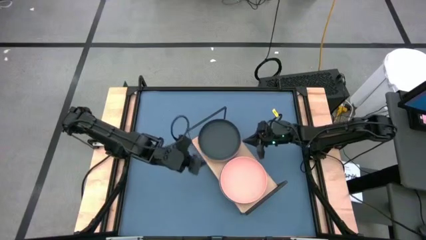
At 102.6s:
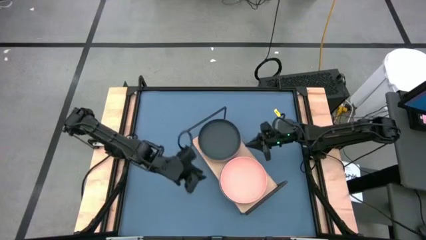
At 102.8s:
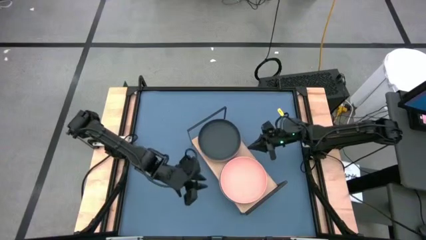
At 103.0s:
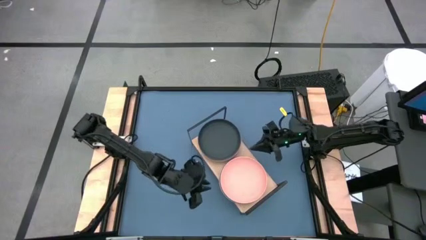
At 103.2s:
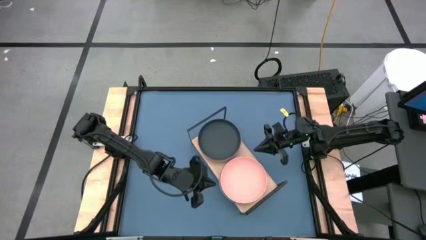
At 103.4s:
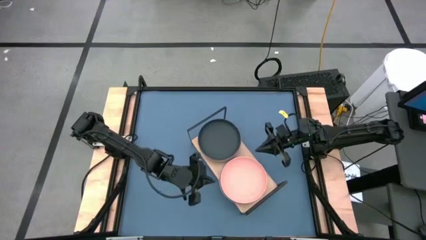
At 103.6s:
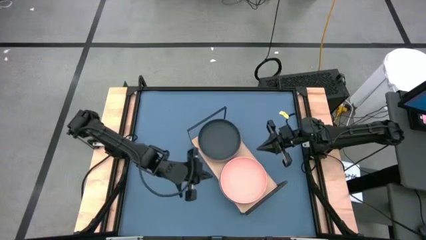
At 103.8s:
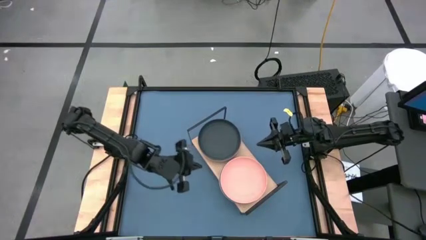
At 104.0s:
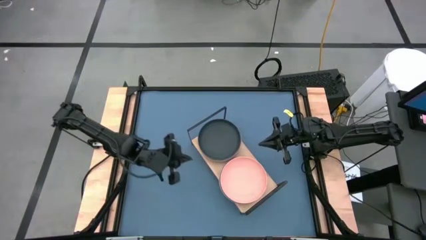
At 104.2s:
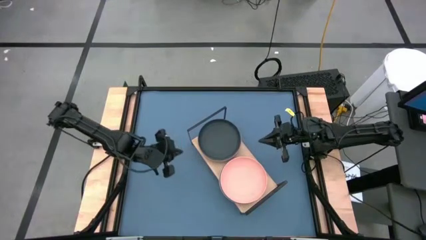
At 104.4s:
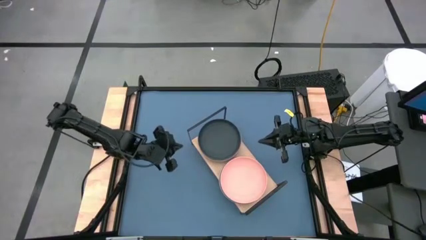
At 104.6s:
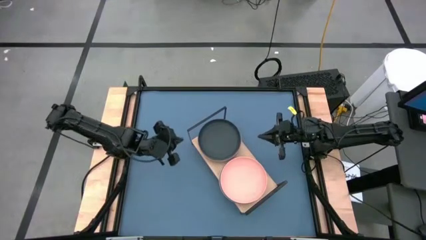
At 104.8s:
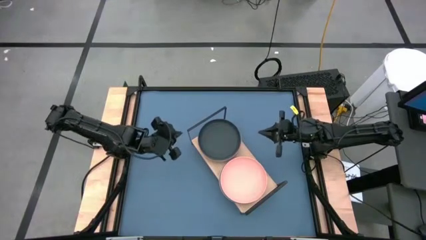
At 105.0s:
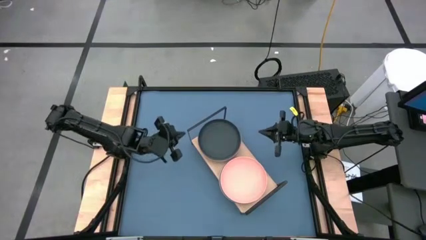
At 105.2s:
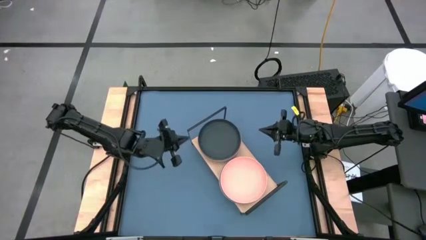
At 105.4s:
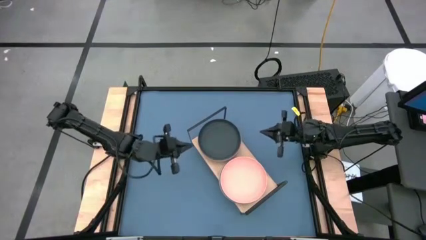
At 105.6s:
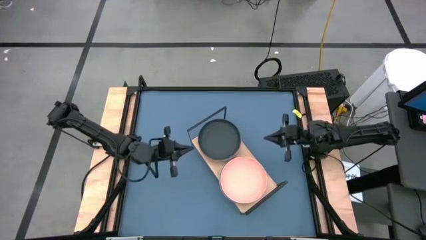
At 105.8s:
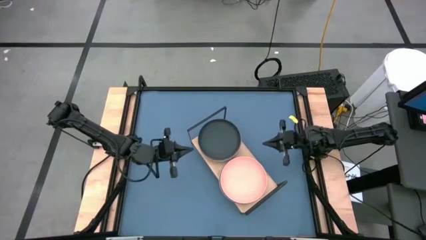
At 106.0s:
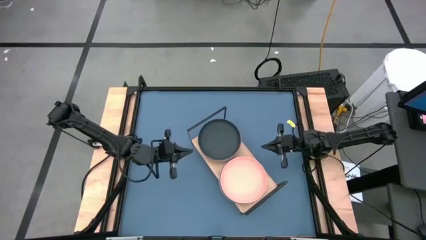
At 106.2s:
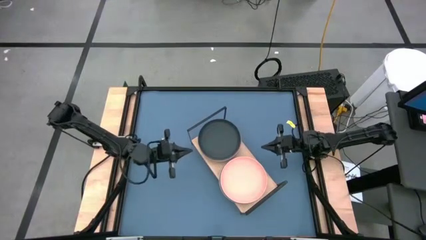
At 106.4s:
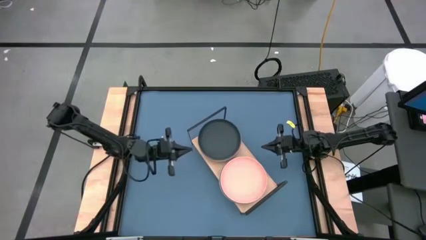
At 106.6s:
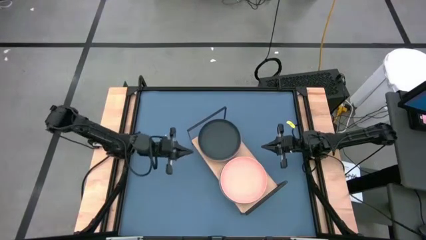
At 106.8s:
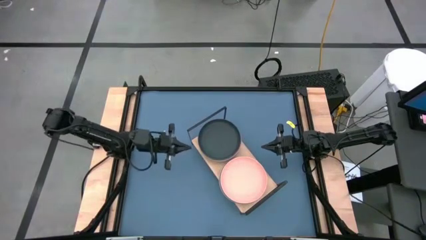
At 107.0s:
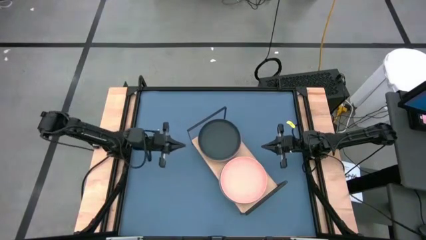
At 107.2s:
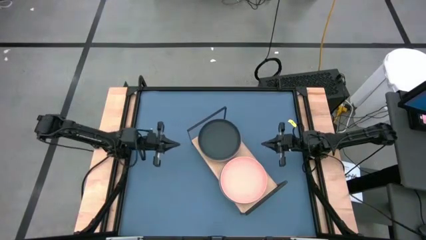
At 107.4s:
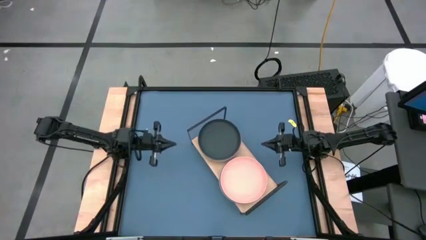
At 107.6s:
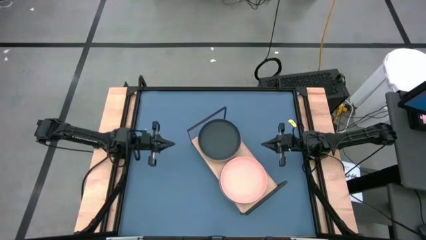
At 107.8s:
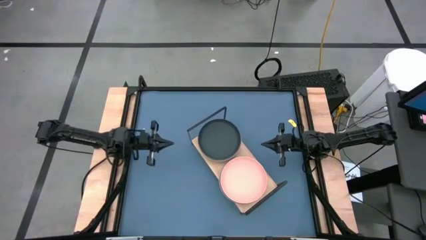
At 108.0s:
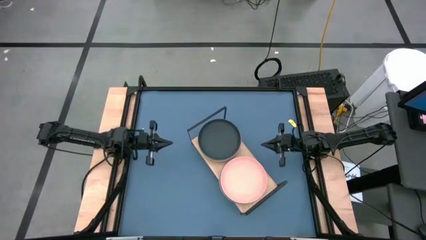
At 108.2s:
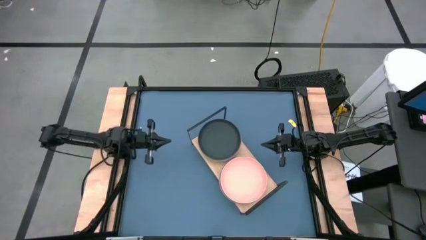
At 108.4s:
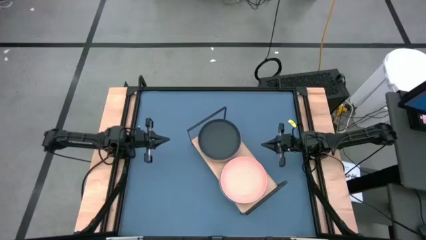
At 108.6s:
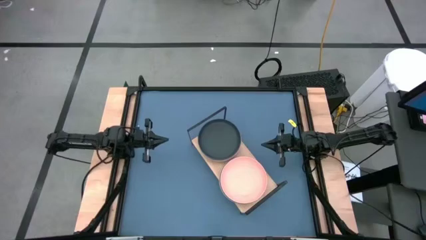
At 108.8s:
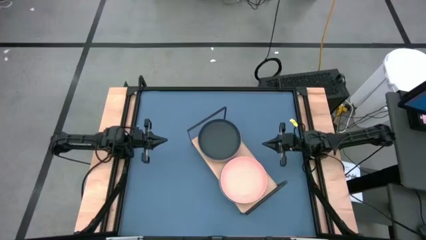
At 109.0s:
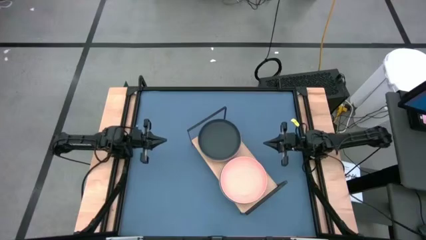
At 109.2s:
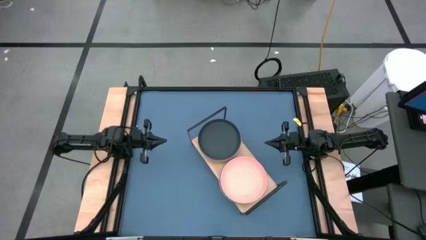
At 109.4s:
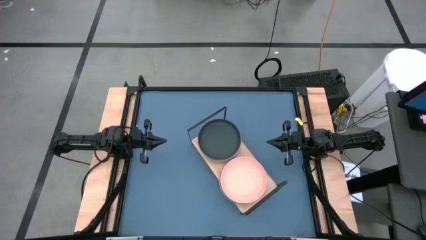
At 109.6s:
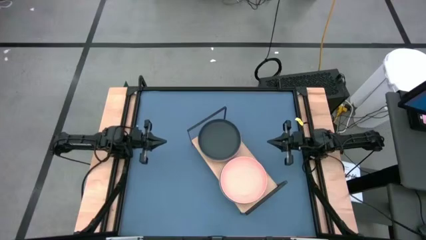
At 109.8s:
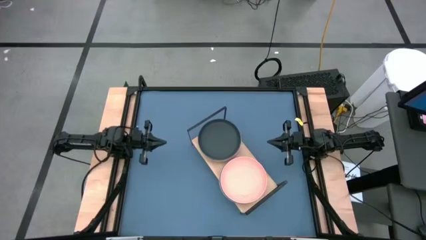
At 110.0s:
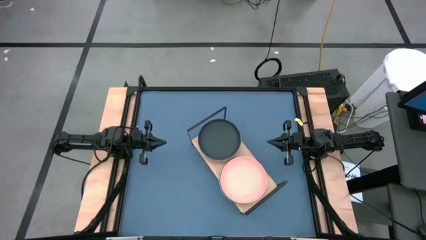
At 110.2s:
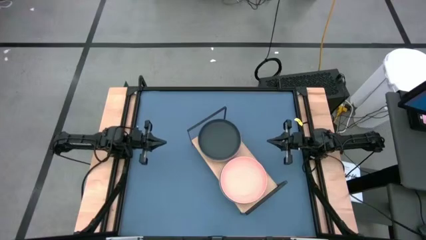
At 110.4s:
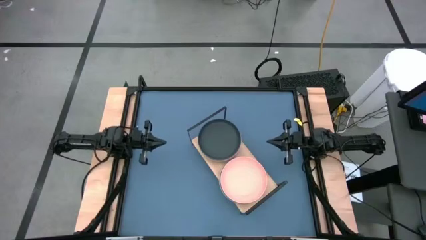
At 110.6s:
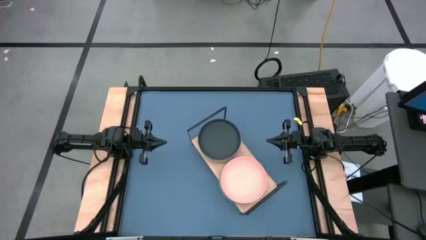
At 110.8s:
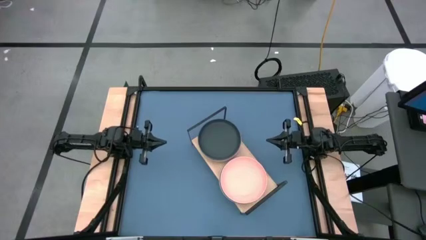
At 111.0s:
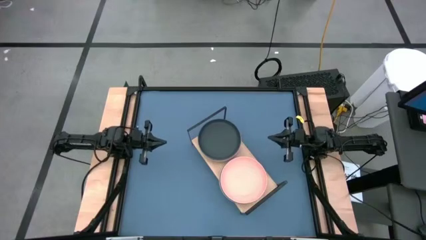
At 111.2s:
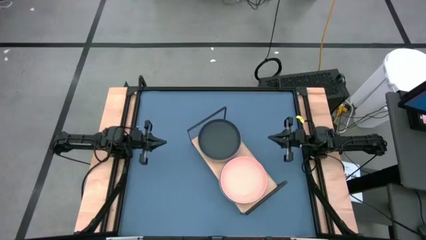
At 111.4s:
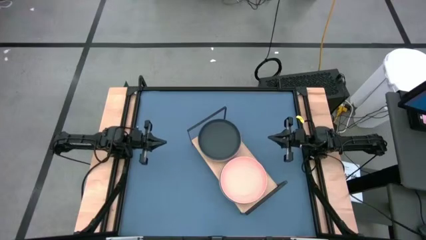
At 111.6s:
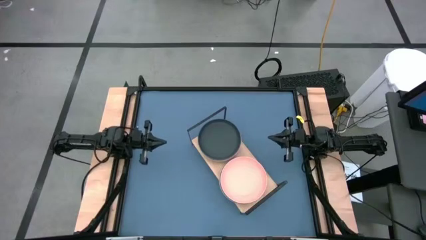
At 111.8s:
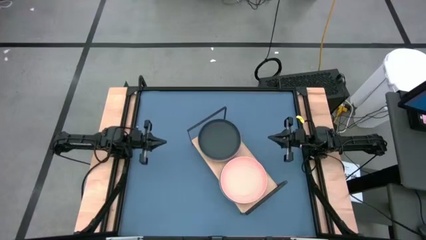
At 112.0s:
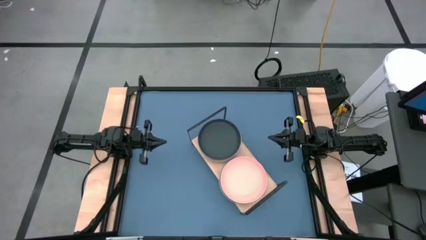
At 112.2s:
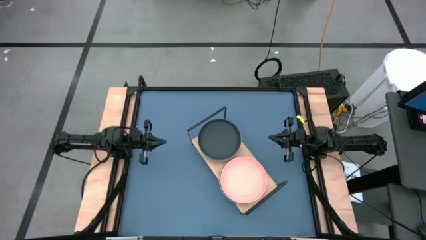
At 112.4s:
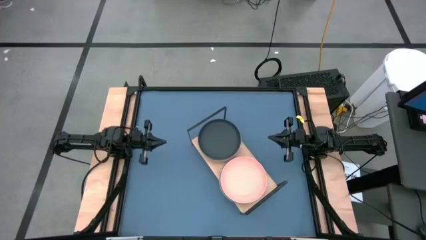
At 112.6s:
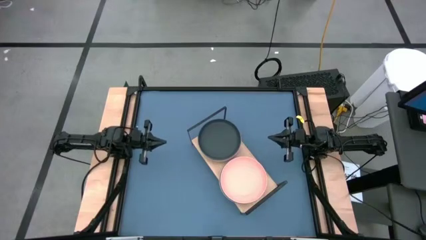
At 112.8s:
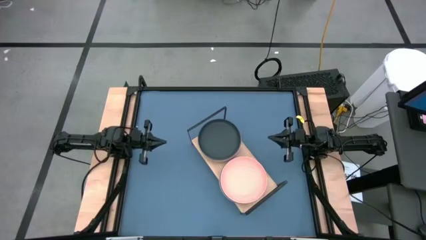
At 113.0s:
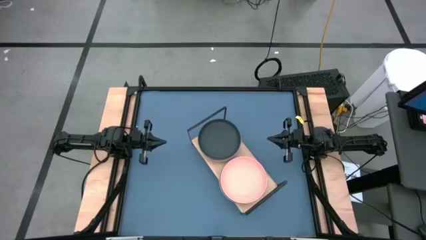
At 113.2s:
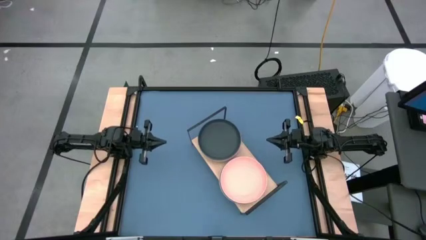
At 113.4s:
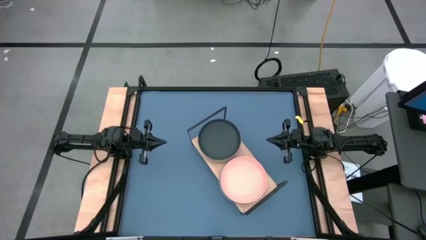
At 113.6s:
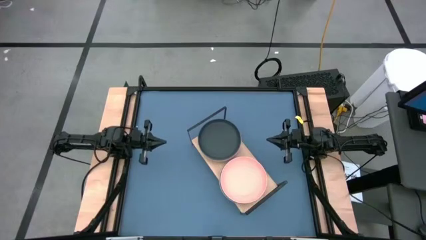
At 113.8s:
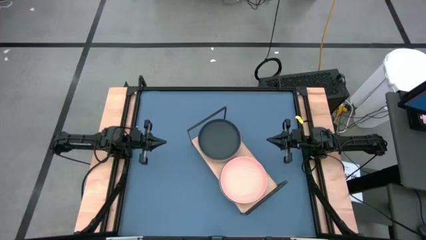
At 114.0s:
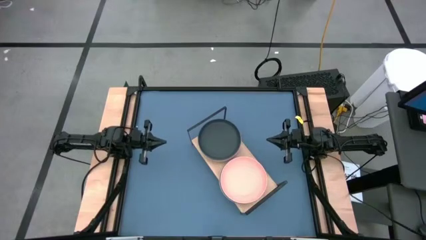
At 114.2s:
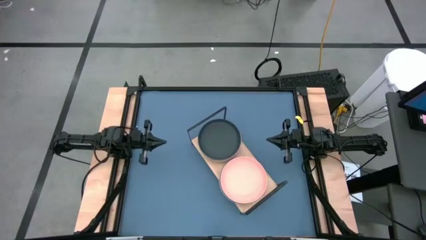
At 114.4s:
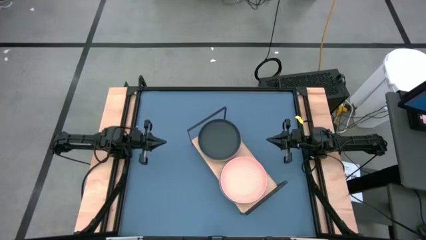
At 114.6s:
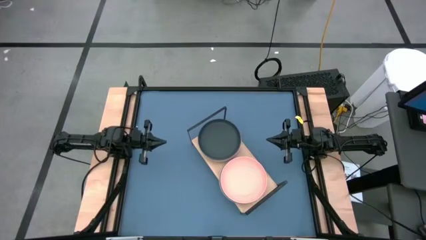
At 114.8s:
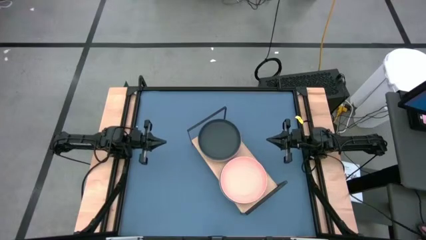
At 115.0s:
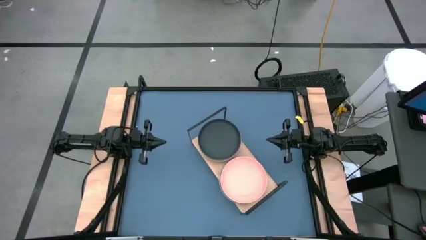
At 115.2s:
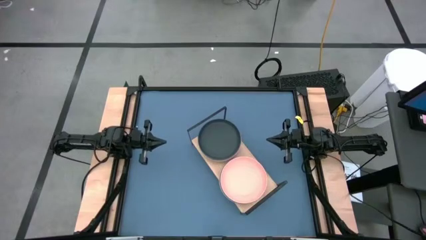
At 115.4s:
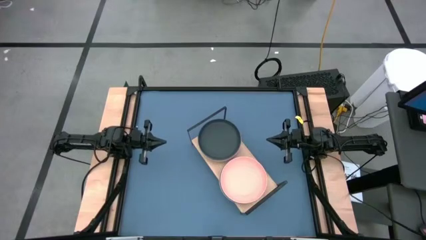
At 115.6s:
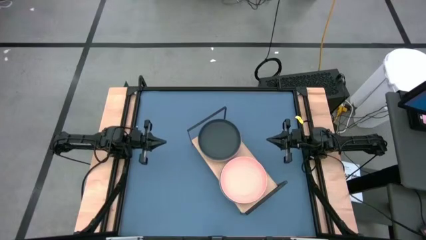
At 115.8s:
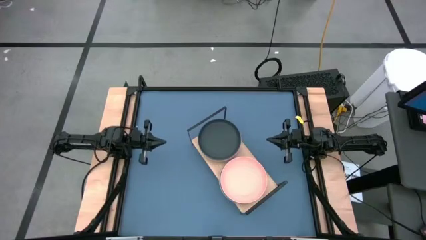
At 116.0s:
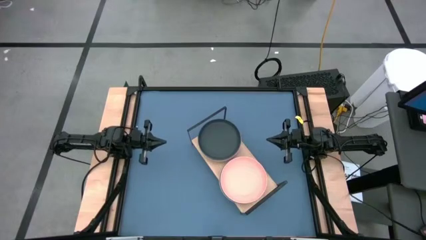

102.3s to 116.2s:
Task: Place and stack plates onto a shelf
Return to Home Position

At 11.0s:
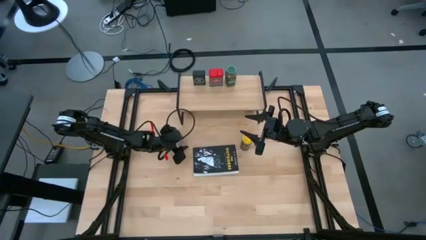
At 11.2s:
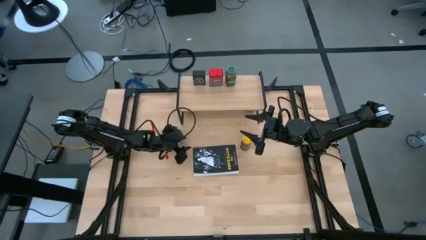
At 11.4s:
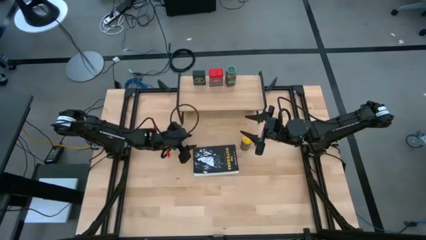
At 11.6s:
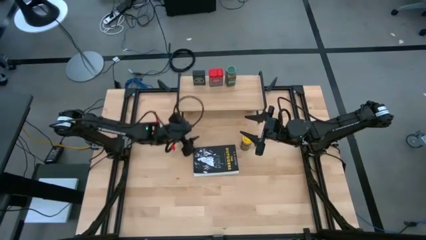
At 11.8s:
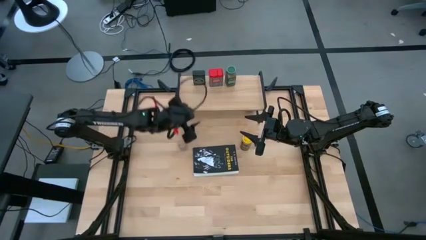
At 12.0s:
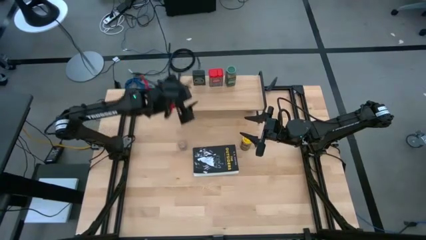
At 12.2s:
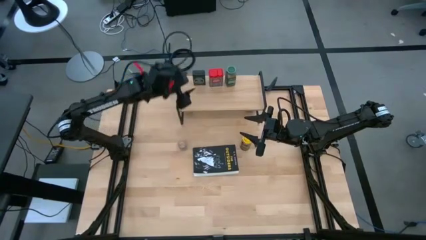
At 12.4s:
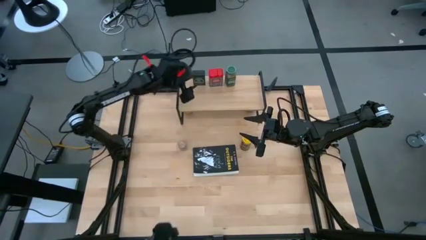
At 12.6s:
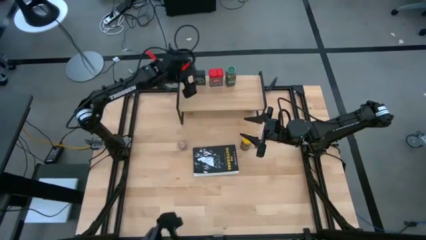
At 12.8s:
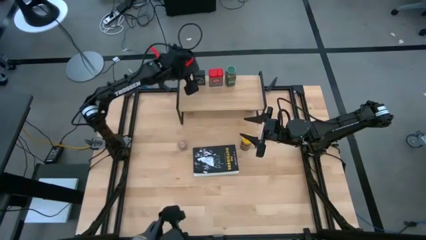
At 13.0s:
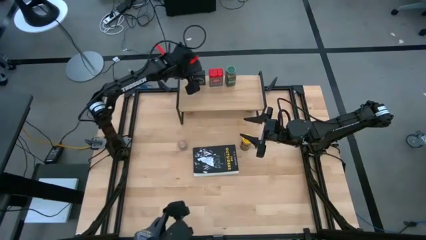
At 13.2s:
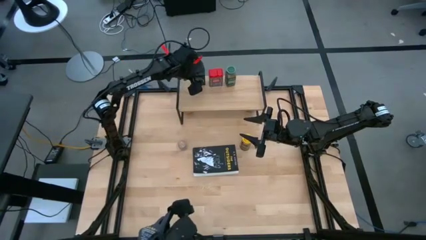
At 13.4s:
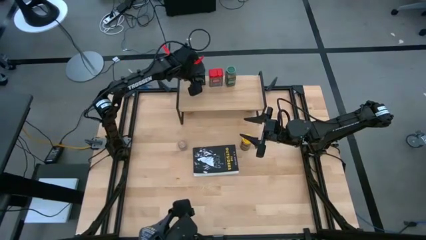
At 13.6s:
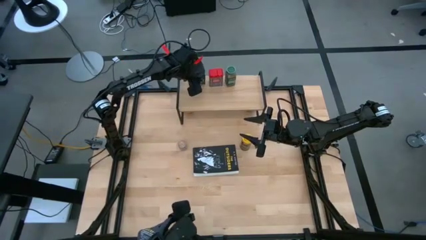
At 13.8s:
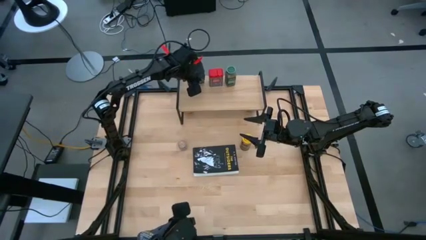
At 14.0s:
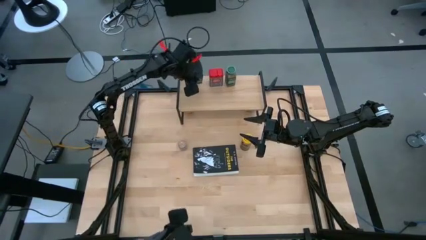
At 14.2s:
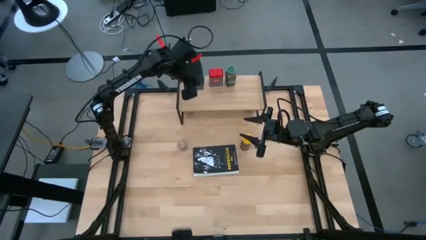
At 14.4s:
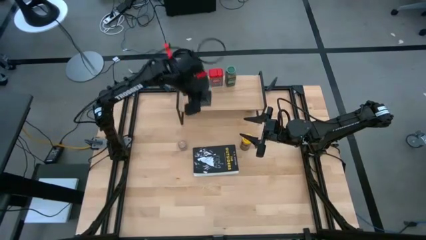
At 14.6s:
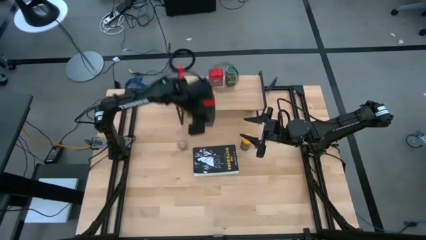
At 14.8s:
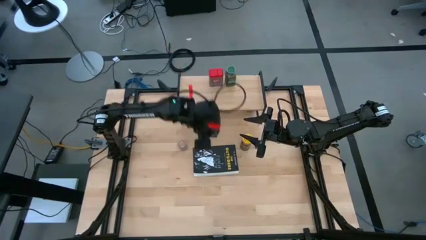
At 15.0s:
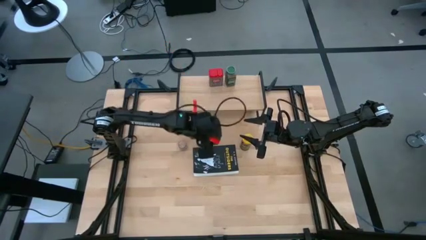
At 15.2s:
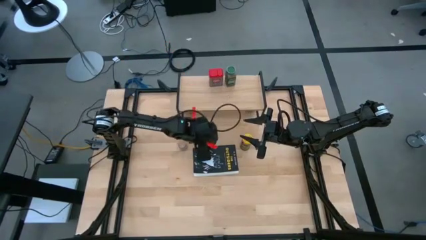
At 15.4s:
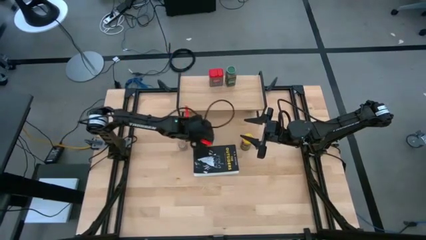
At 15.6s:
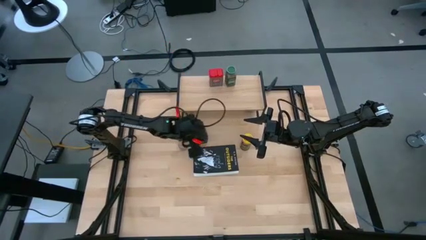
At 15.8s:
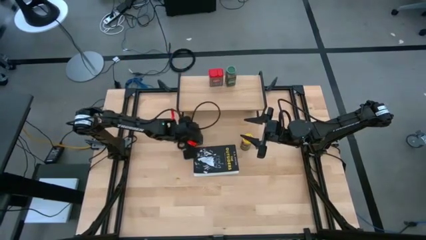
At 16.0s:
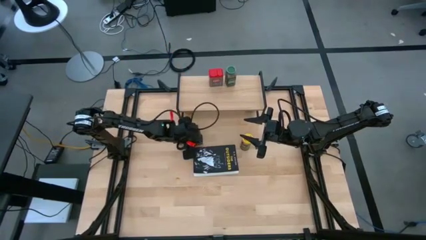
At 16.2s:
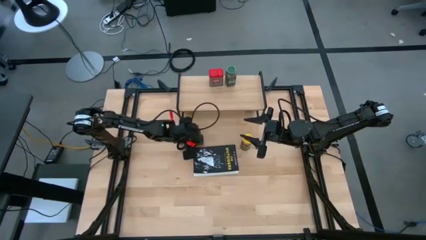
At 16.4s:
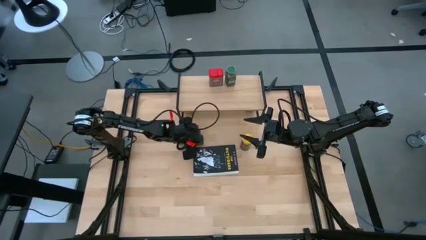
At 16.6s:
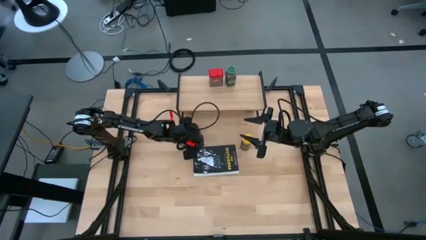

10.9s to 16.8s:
Task: Shelf spices
Remove the black seasoning can from the shelf
